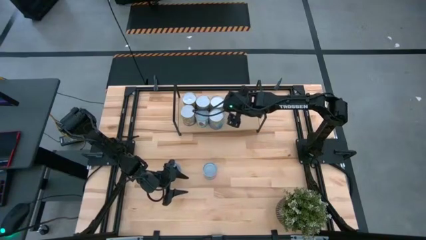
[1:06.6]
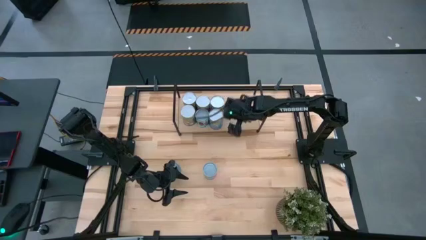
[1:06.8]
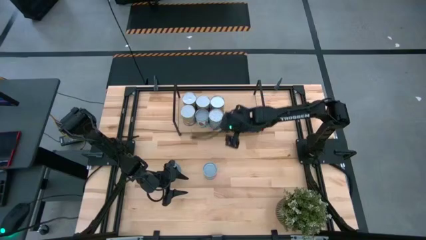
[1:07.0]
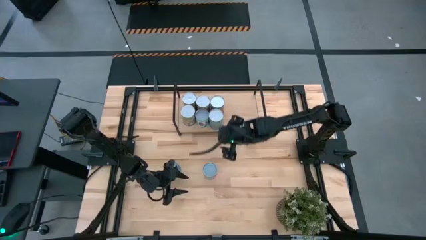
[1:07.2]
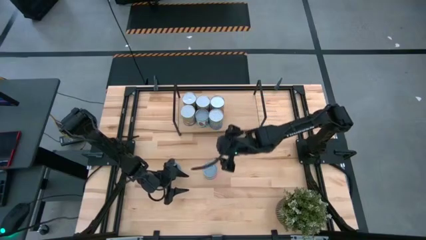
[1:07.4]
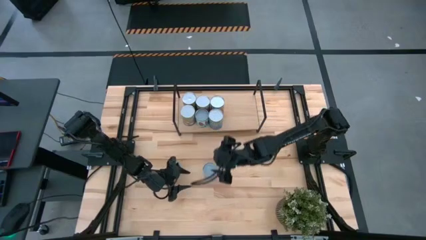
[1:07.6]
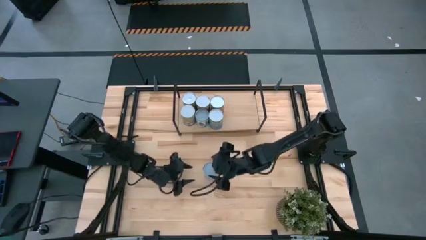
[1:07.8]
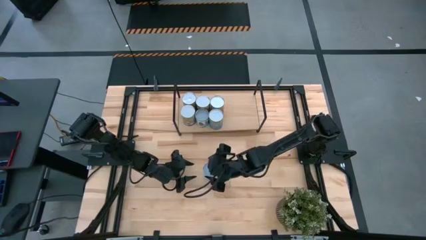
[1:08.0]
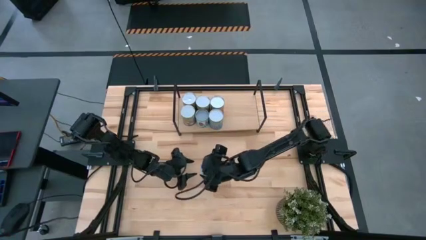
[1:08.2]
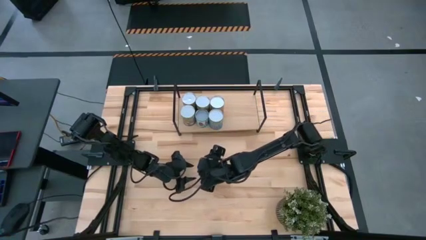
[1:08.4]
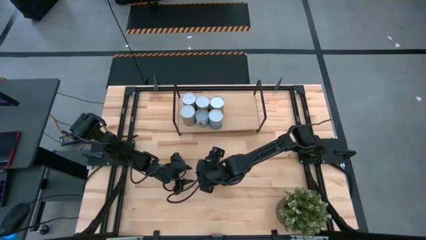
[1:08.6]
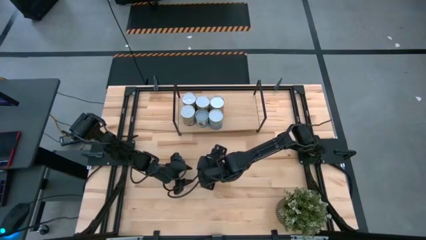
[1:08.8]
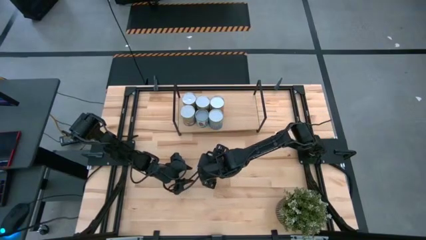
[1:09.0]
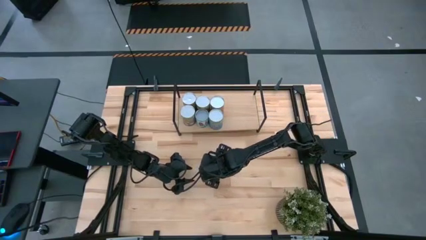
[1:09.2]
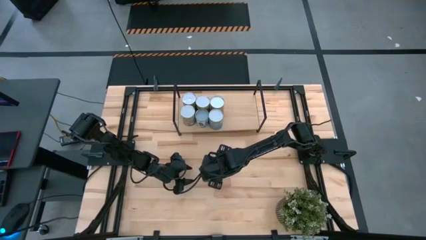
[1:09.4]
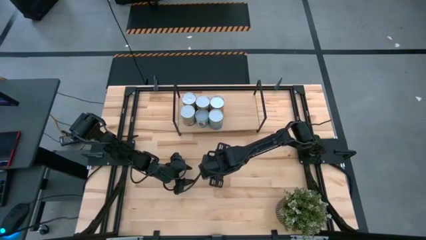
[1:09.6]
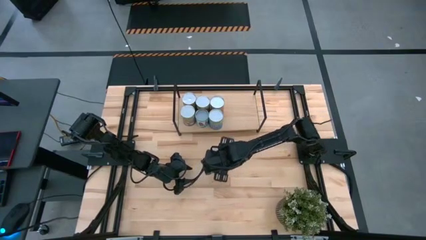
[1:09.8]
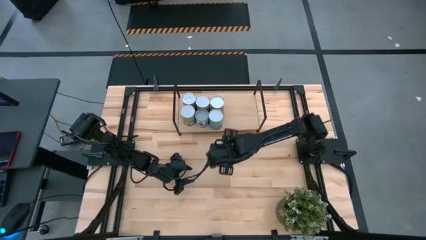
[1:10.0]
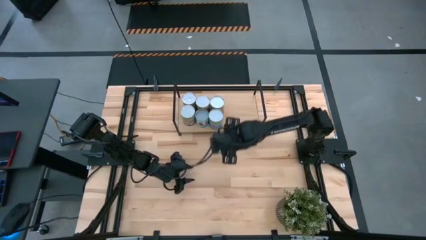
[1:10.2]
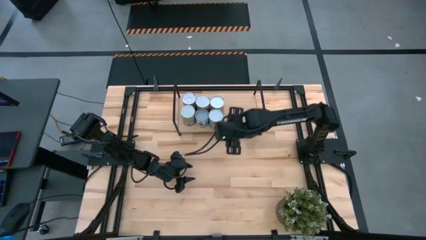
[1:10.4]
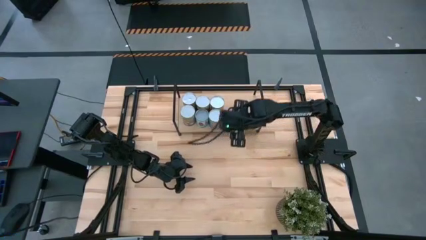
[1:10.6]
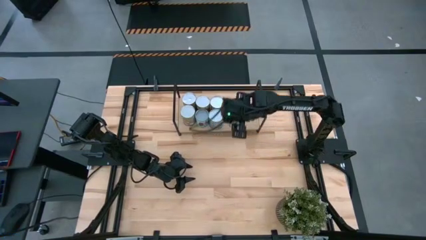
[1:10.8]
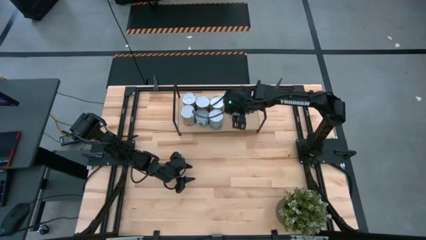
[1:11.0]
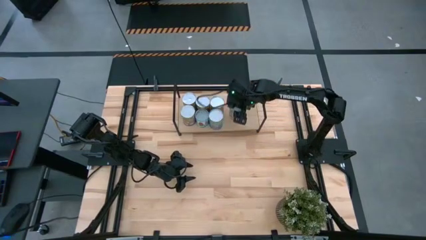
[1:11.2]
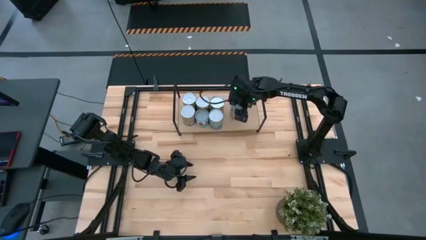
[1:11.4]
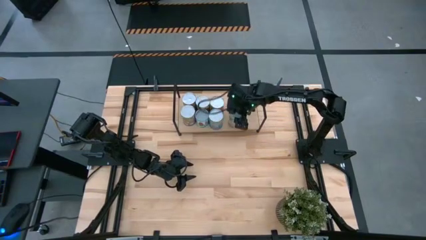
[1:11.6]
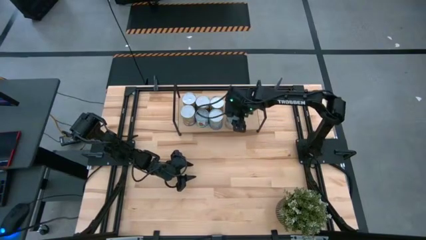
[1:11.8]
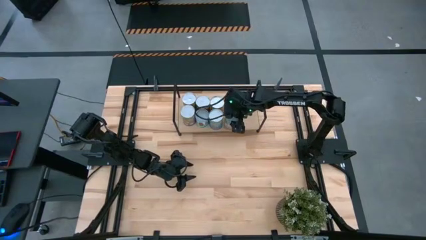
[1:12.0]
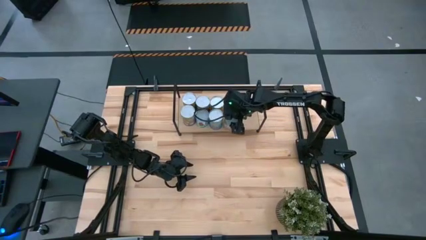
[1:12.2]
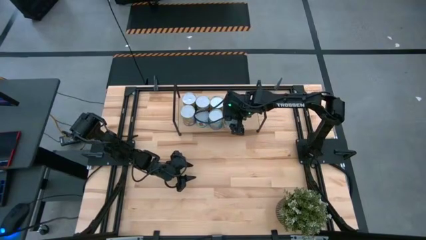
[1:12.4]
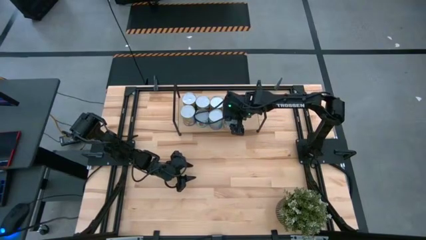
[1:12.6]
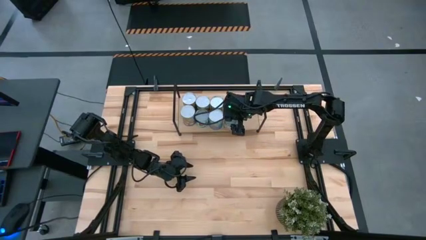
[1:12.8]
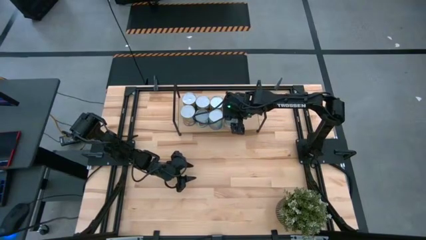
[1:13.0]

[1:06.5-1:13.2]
Task: Pick and place cans onto a shelf
Put the canned chicken soup on the shelf

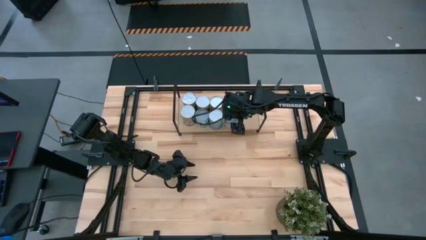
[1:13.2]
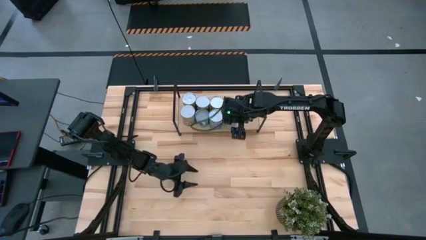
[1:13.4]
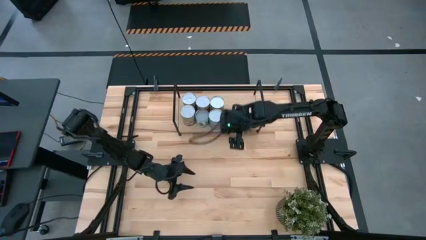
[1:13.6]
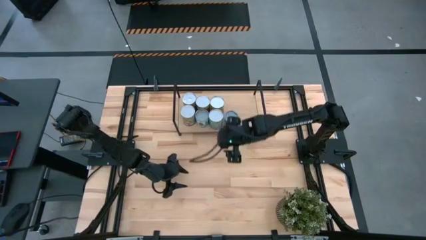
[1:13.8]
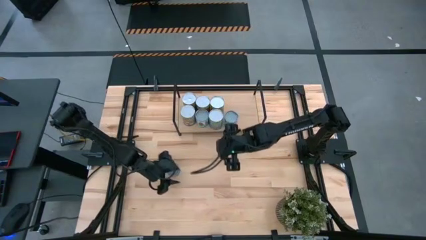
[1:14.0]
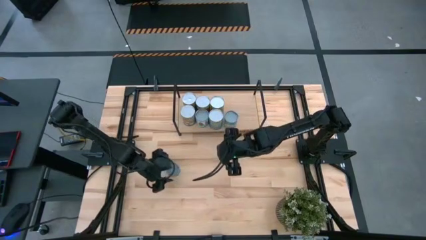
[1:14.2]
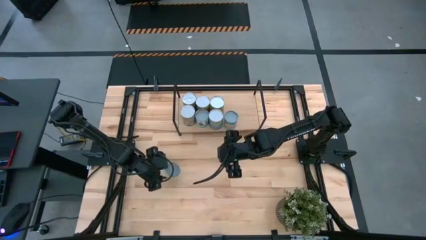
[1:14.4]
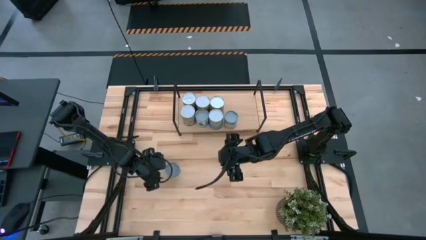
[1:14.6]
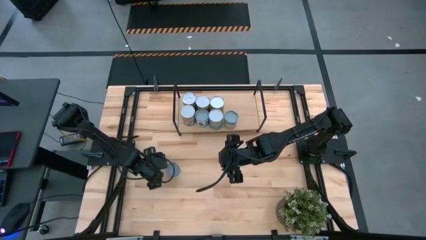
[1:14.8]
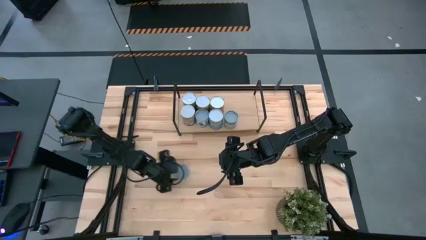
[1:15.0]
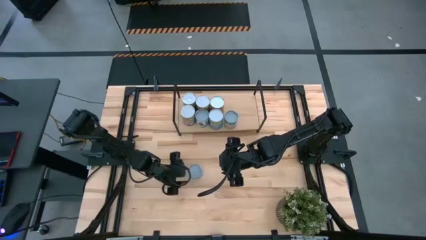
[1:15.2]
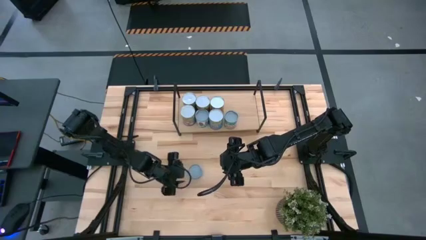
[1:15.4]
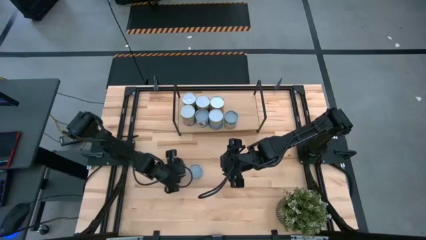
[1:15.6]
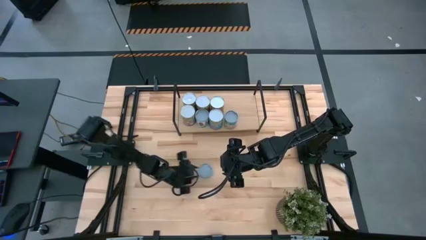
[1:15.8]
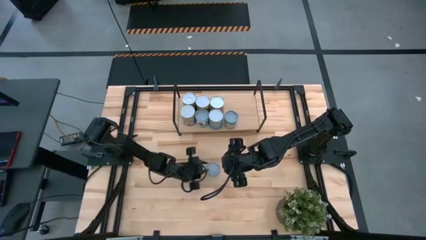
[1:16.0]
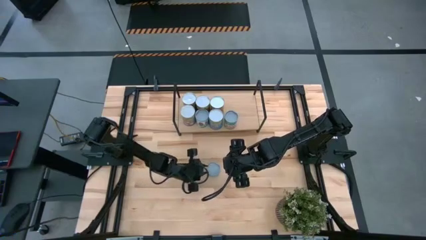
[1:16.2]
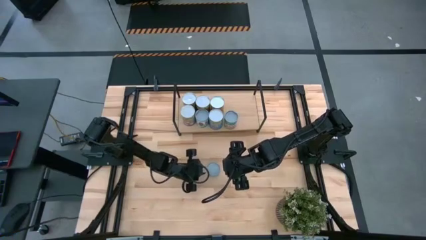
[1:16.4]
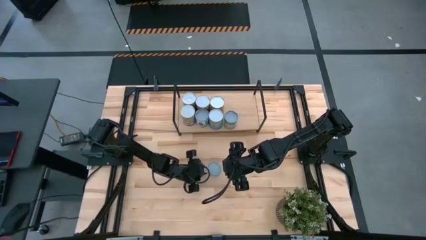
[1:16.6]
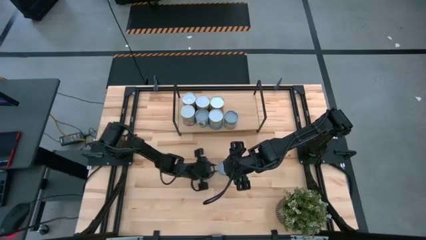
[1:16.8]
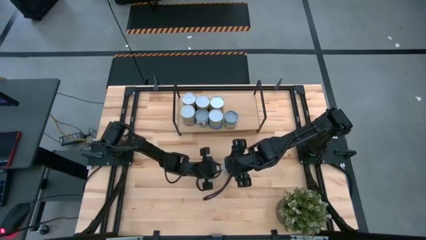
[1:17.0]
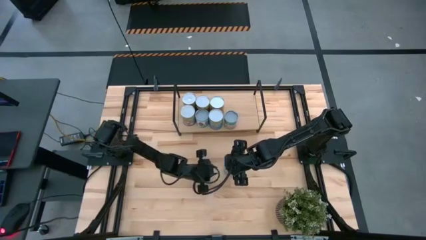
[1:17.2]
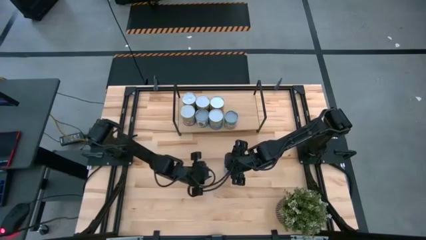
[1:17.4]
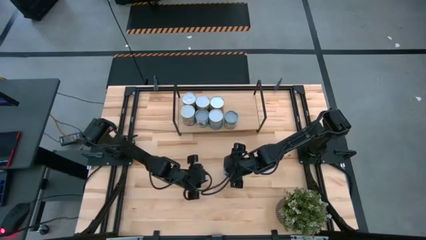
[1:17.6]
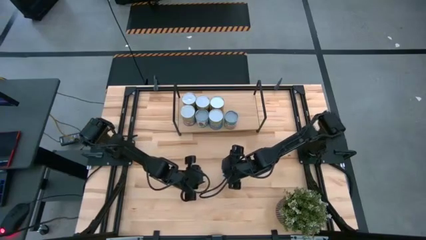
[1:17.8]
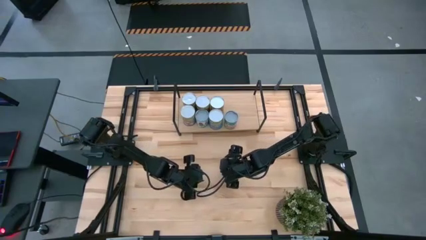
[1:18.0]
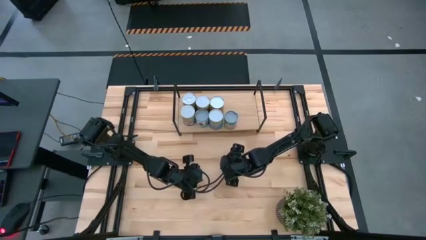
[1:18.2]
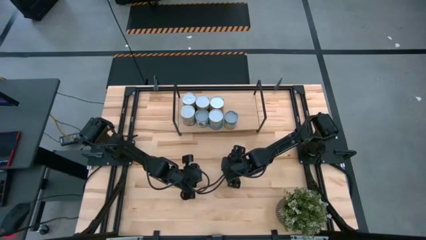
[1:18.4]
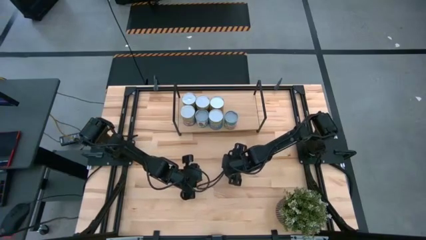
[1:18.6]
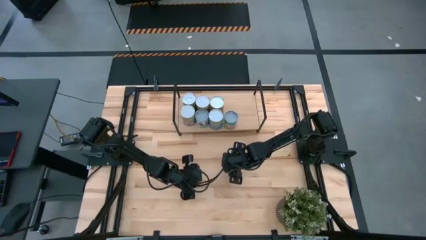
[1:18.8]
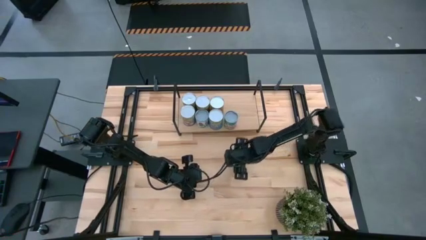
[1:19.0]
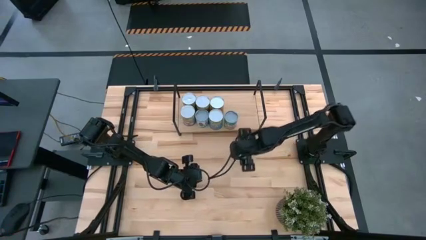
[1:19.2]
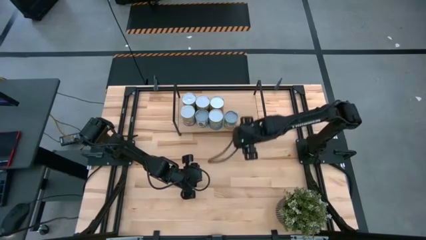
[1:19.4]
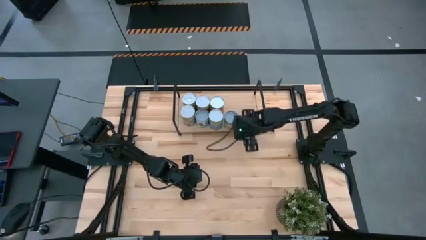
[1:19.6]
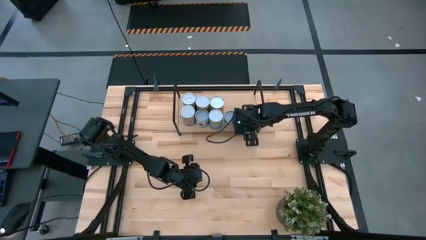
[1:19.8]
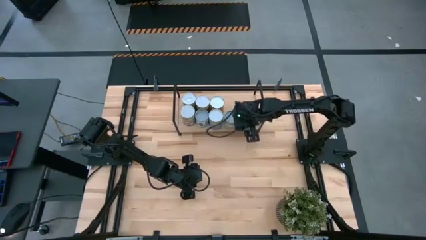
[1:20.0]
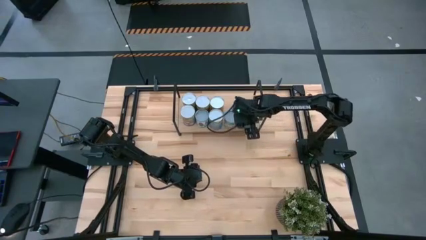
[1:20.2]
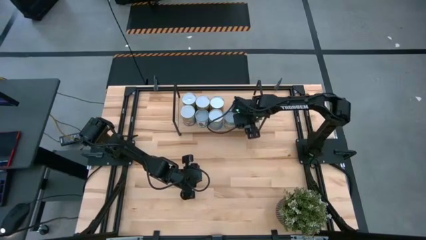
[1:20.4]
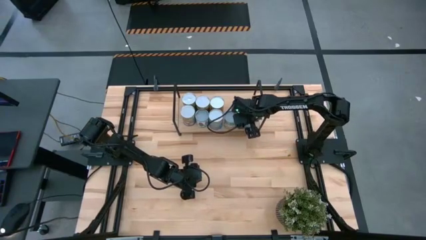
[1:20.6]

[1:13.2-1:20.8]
Put the canned tuna on the shelf

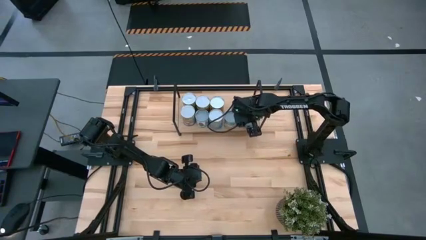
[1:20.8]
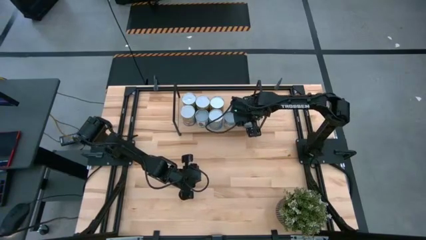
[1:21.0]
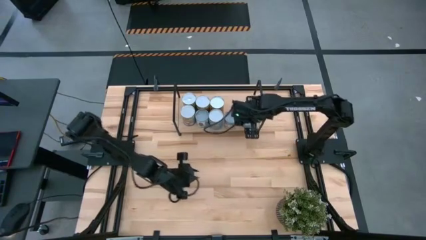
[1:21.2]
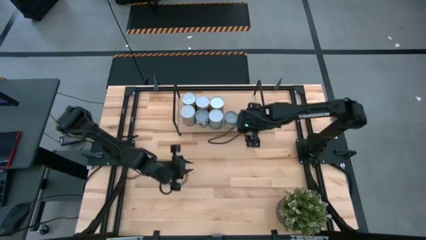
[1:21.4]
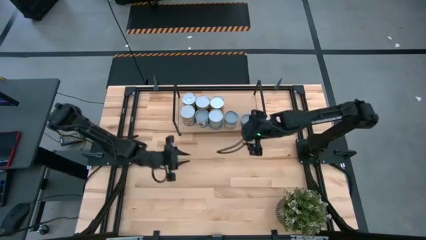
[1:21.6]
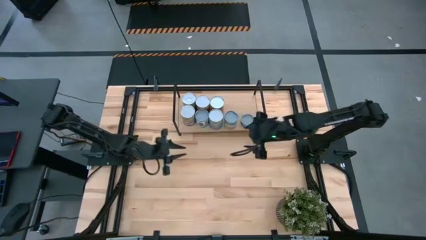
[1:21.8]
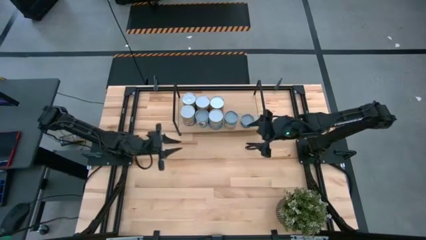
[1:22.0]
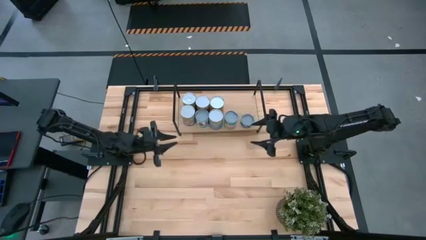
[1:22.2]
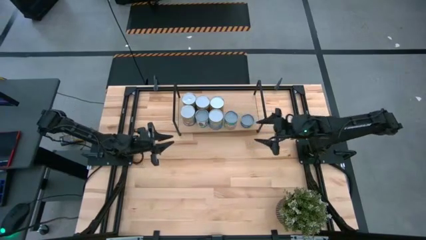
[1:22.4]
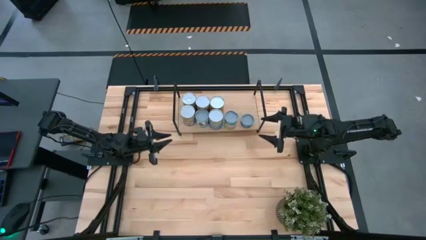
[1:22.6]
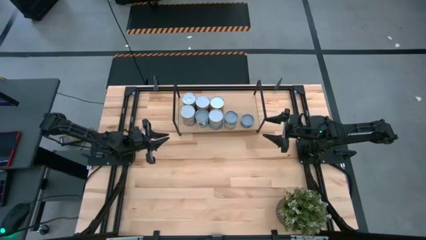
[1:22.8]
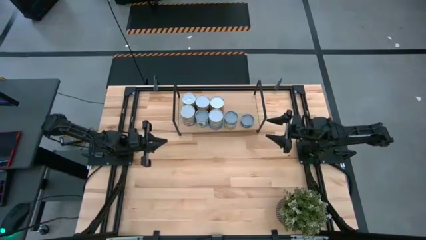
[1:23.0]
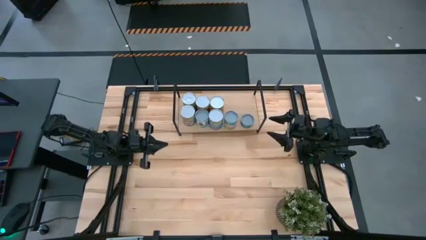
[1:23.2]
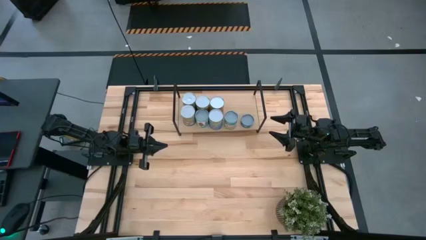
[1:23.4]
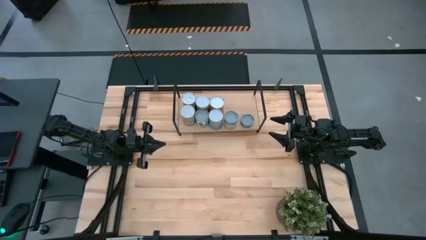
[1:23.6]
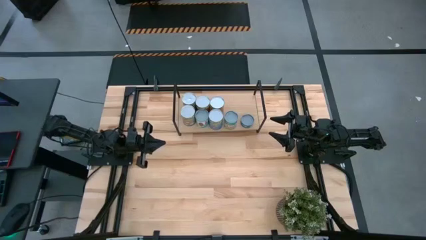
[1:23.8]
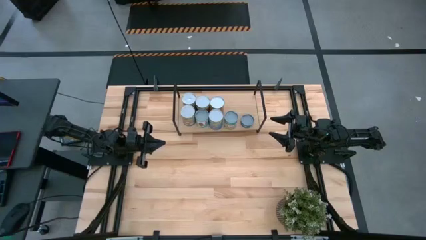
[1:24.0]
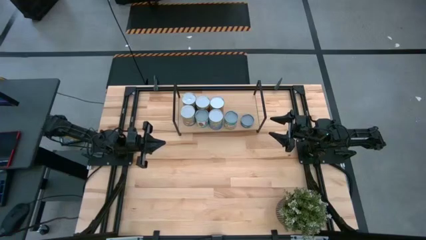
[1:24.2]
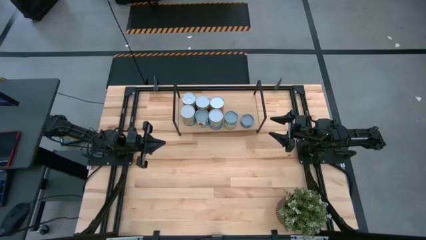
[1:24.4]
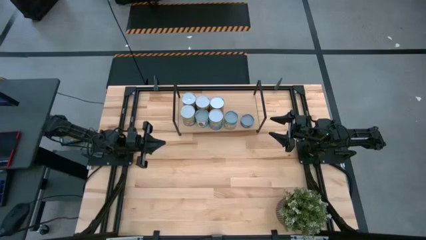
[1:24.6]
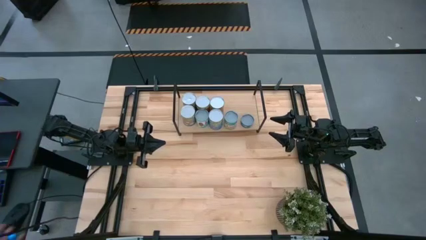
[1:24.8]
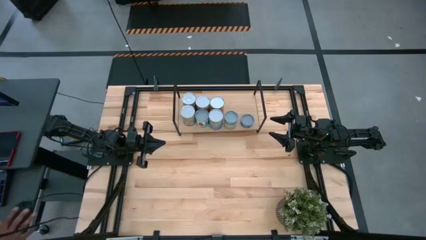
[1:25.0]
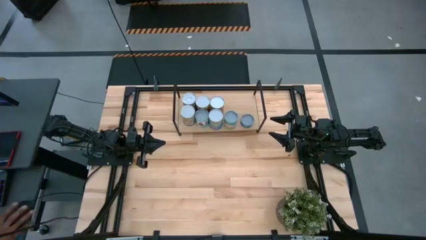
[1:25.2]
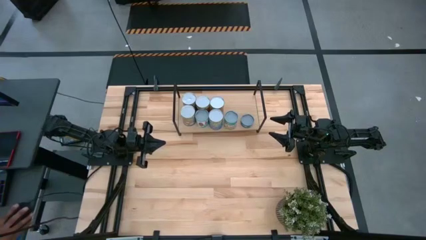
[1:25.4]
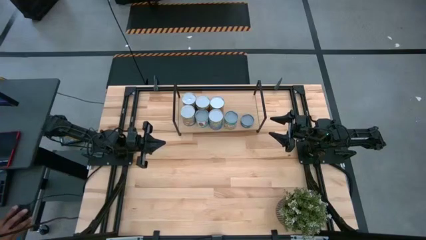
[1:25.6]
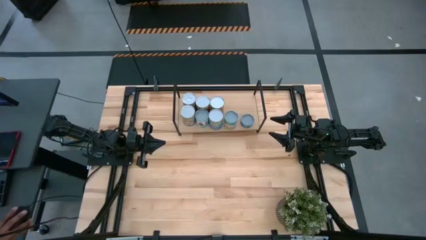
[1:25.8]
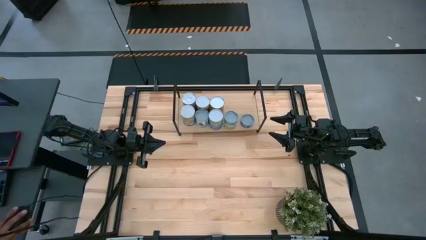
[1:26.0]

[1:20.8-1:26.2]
Return to Home Position
